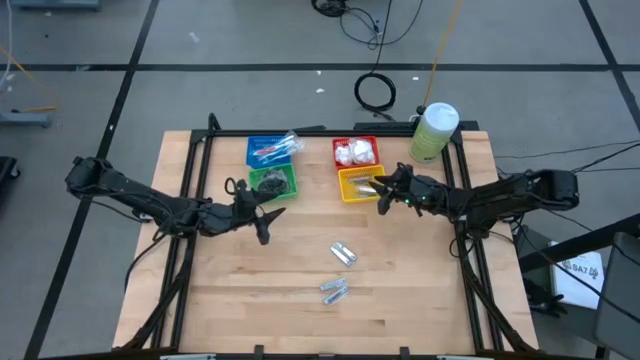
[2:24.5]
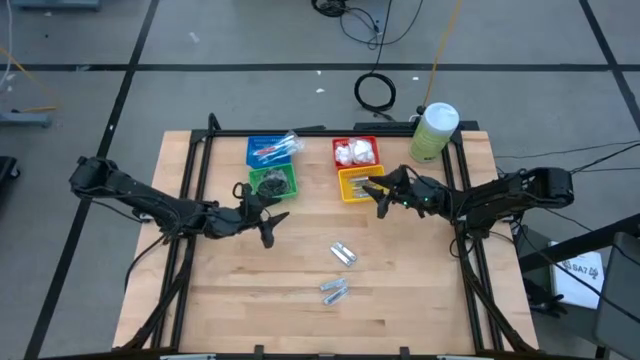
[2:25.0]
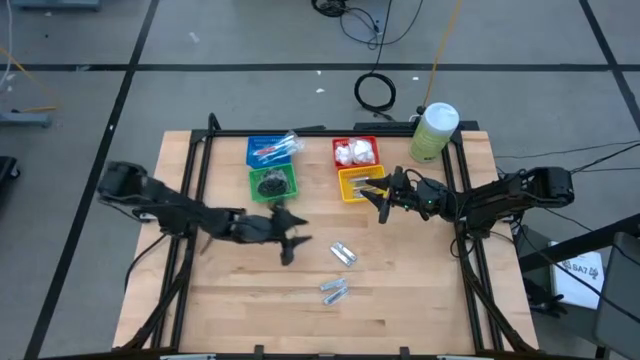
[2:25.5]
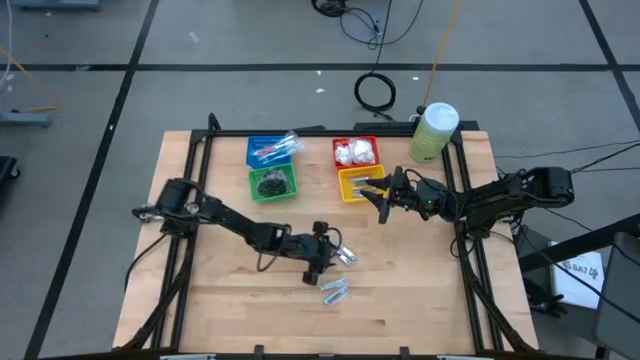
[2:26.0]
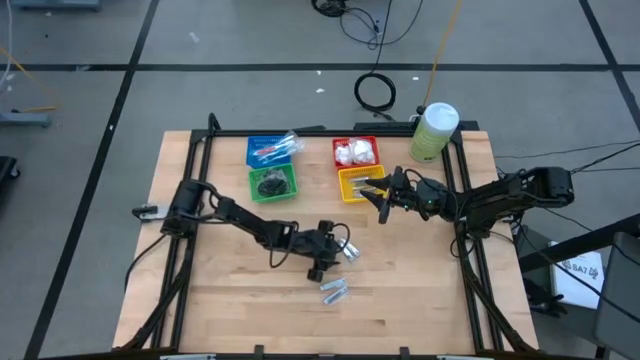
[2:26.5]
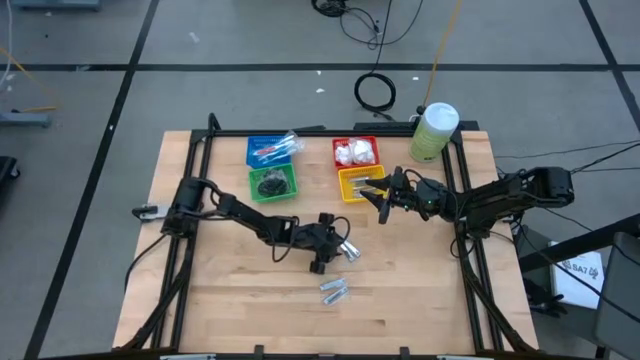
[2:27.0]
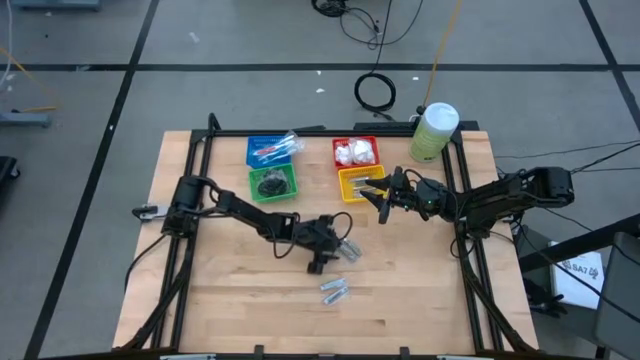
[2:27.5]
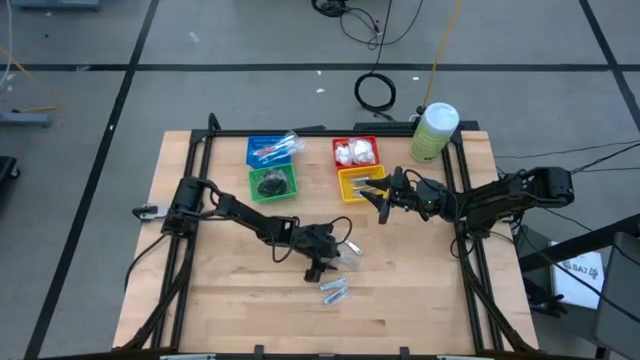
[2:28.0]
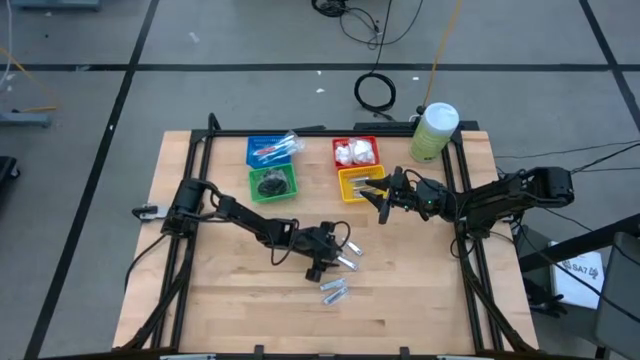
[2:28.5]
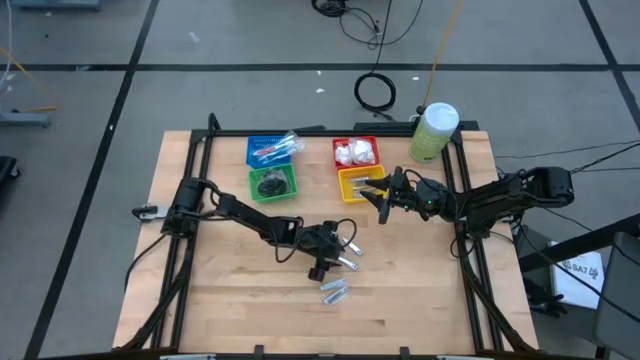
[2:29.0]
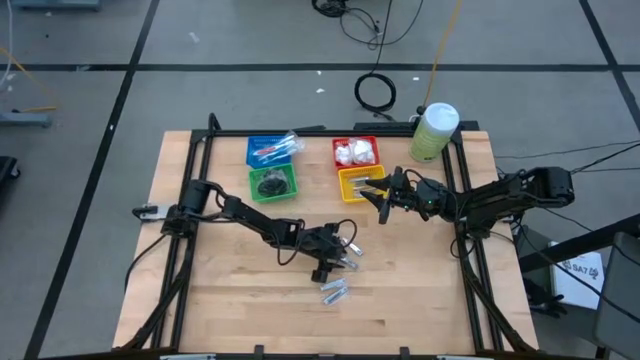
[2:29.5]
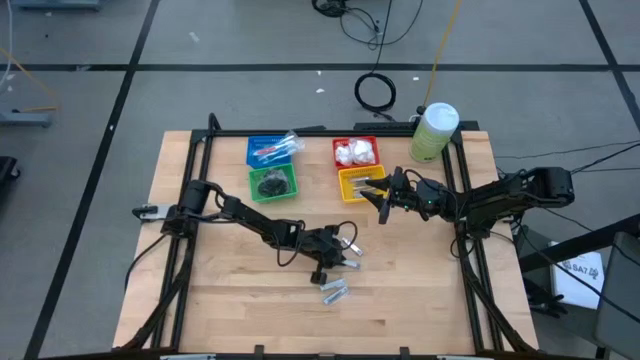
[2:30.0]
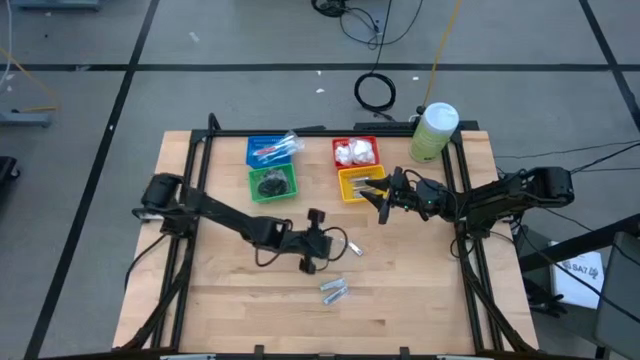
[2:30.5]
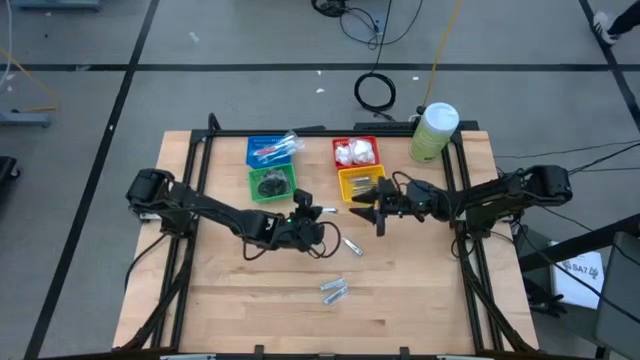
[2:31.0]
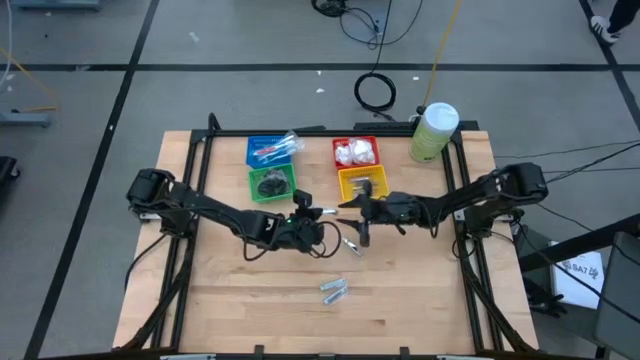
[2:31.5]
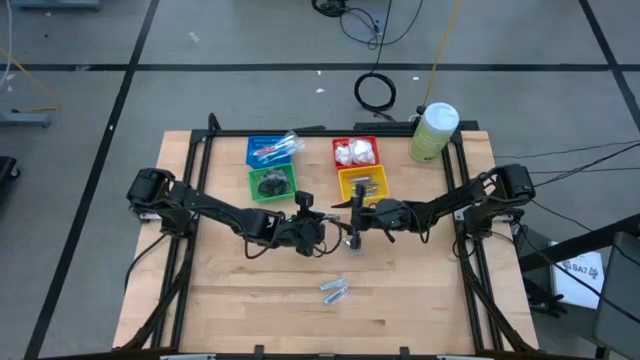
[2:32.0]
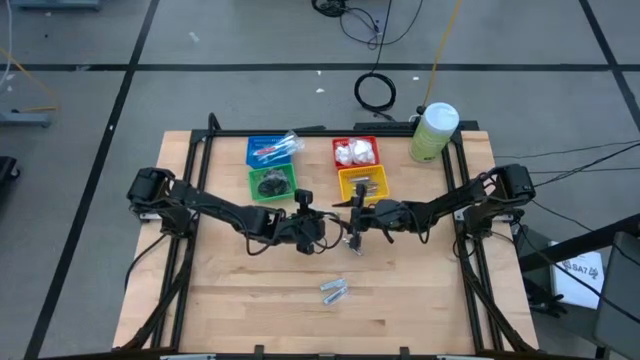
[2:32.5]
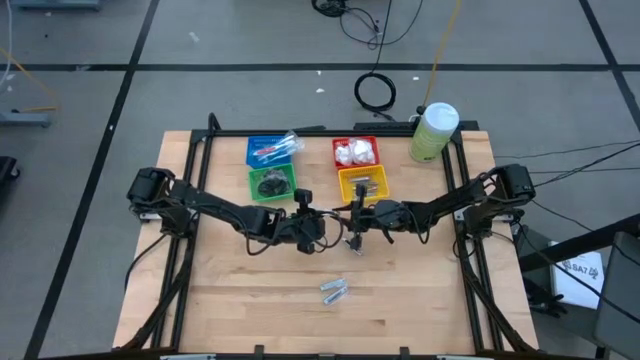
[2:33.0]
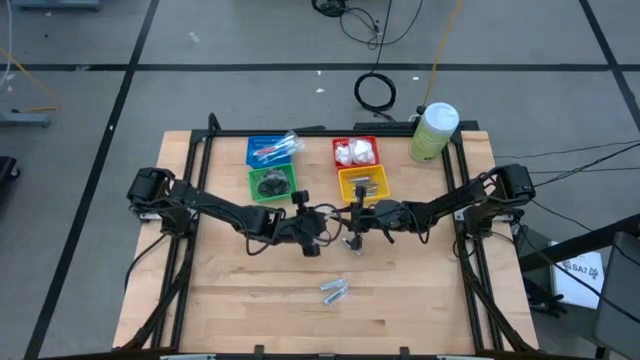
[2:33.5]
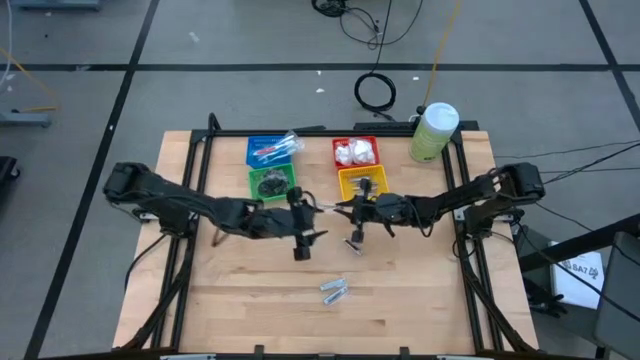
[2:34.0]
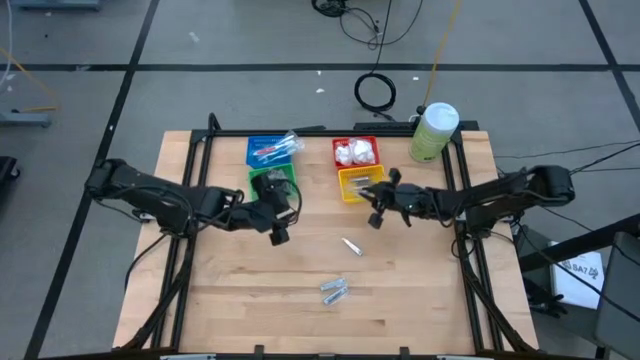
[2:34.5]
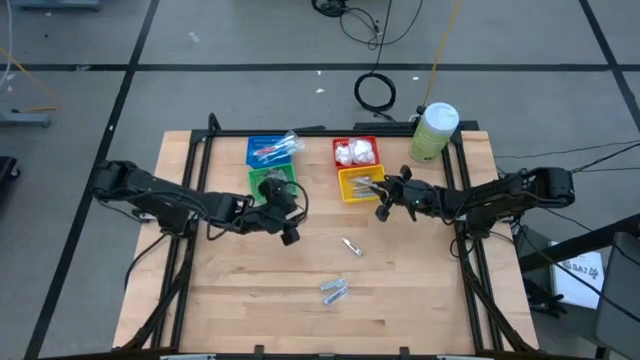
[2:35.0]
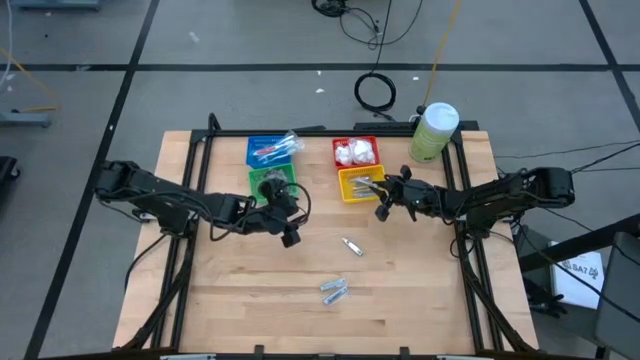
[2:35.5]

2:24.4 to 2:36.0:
Task: Pick & Place Travel size toiletries
Put the nail cutter into the yellow bin

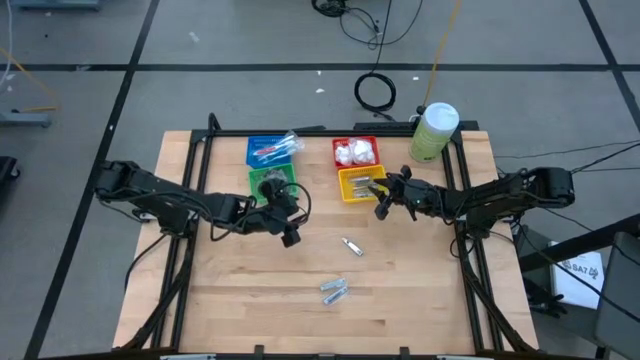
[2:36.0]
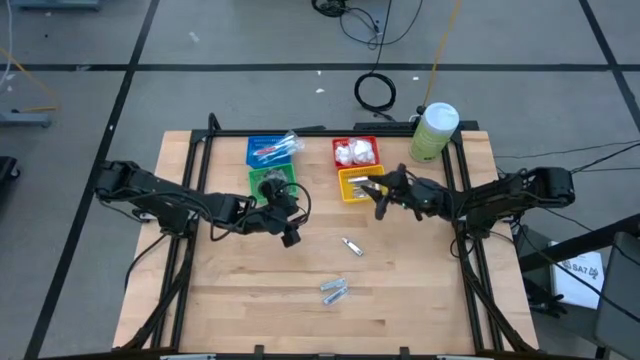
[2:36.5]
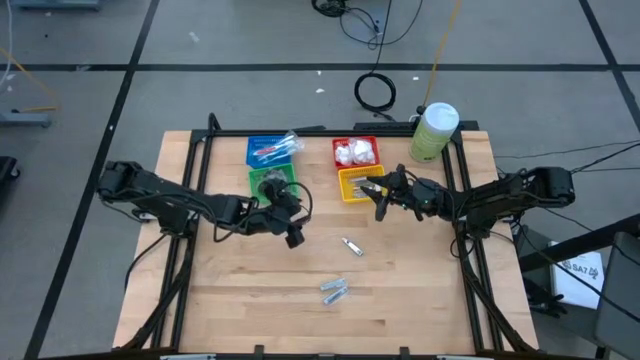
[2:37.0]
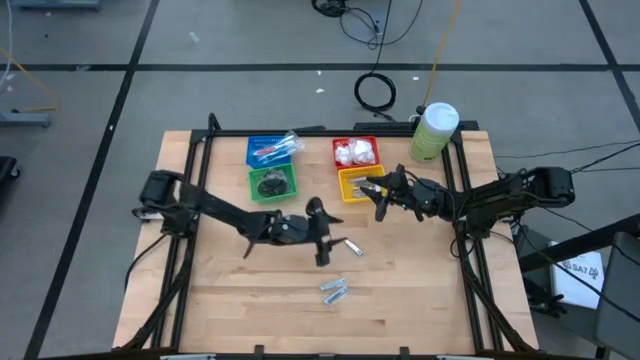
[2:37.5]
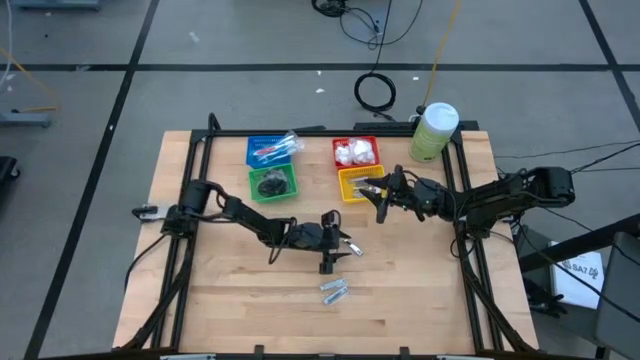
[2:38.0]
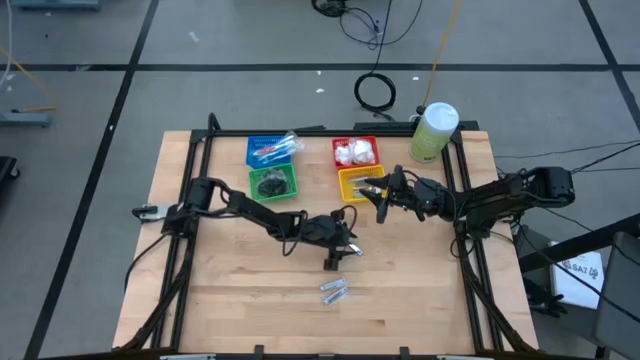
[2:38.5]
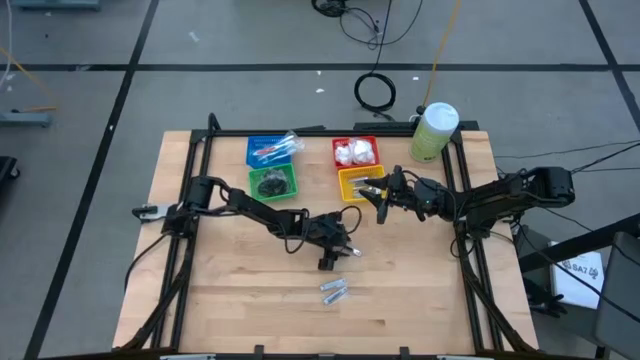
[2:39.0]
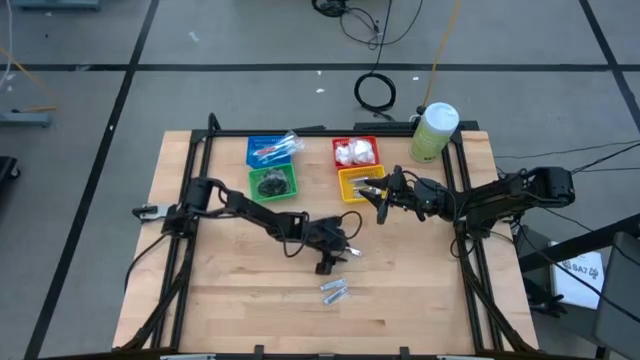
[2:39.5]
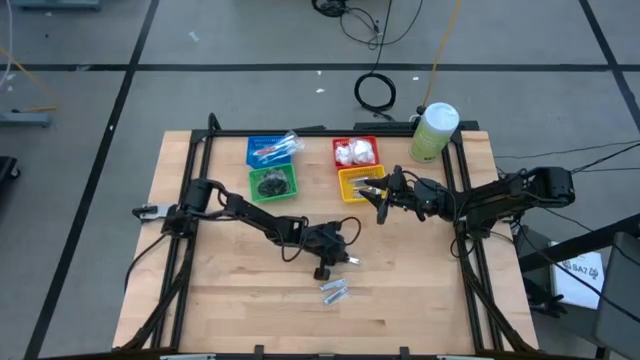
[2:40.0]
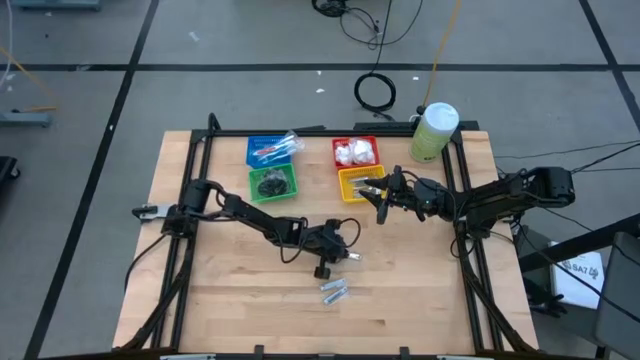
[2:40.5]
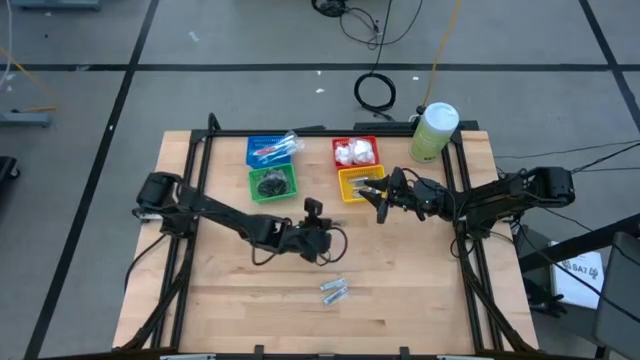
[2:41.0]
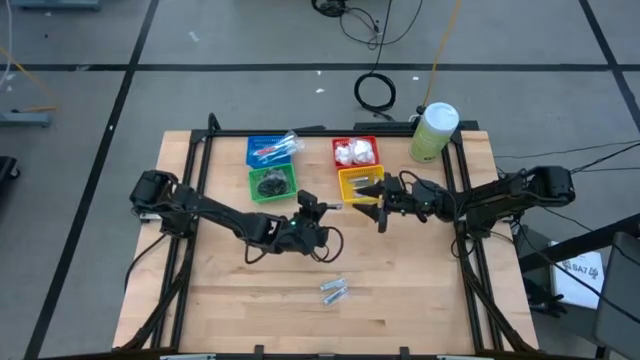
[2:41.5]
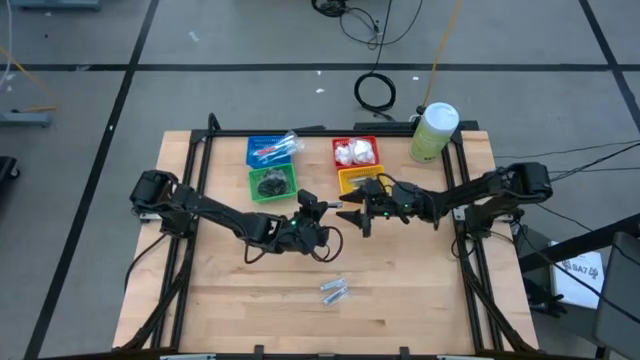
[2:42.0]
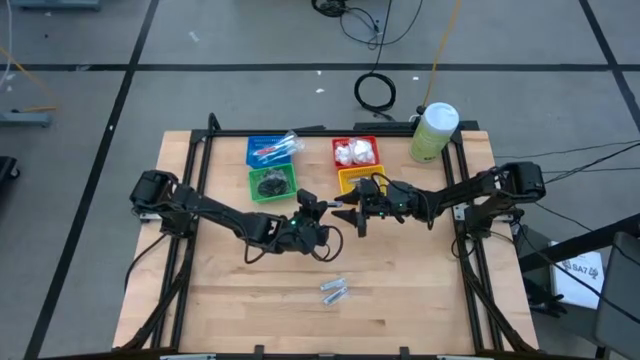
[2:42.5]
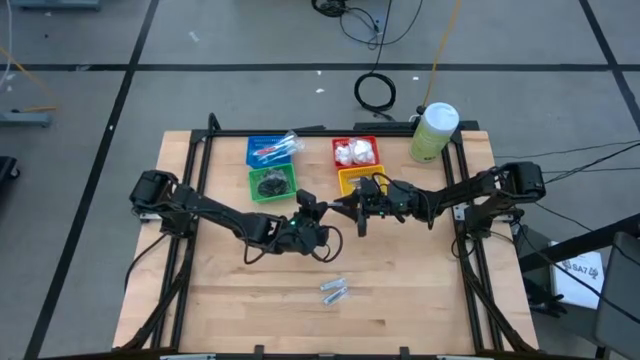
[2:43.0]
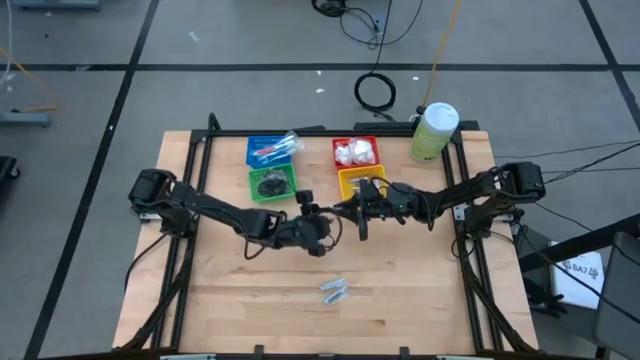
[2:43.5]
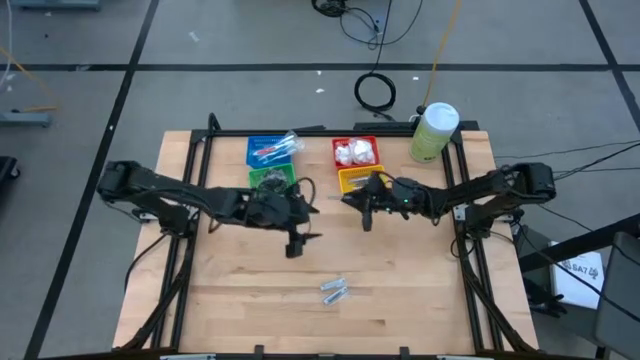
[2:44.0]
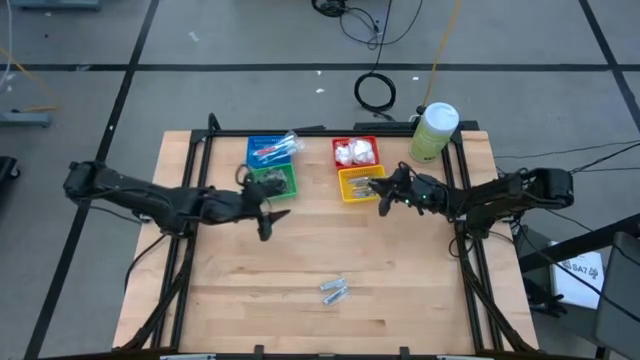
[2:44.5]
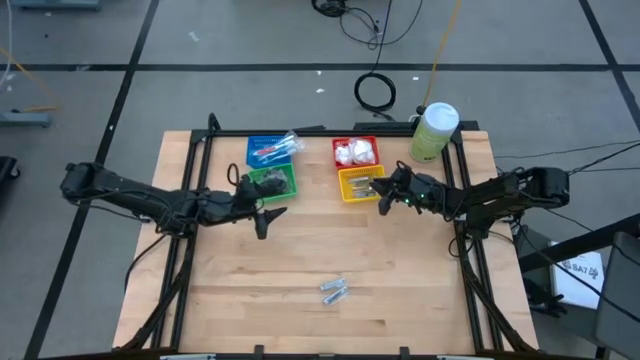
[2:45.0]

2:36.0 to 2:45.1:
Put the nail cutter into the yellow bin
